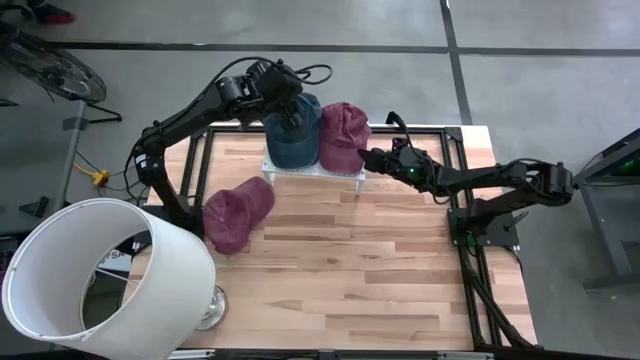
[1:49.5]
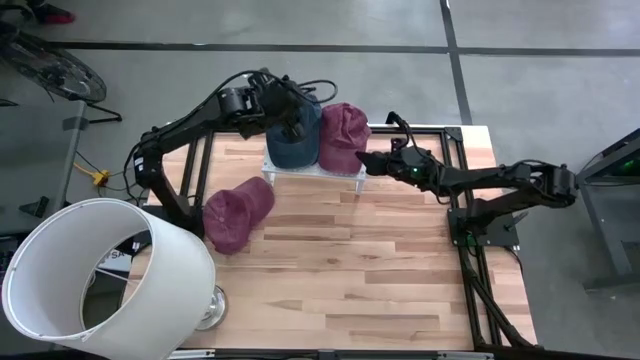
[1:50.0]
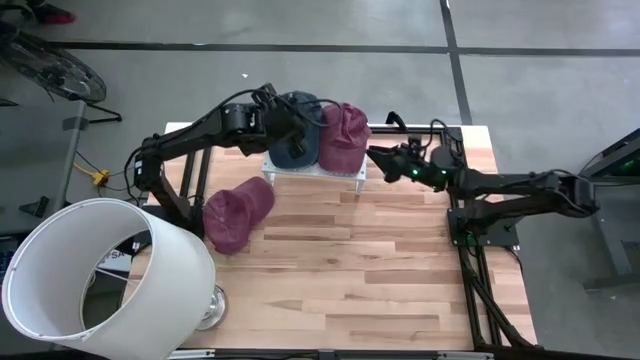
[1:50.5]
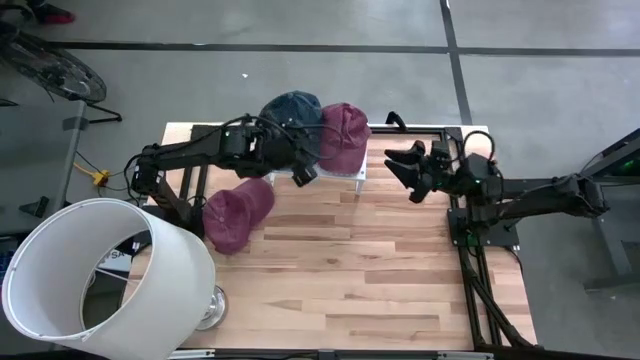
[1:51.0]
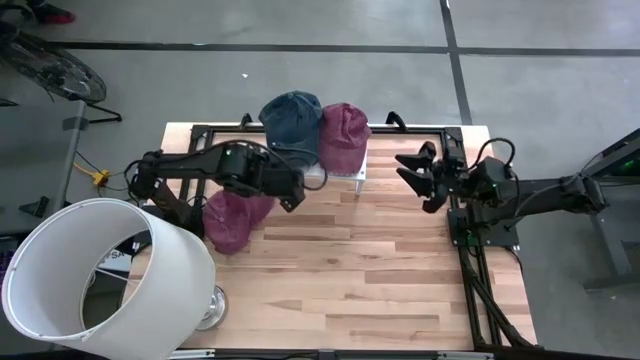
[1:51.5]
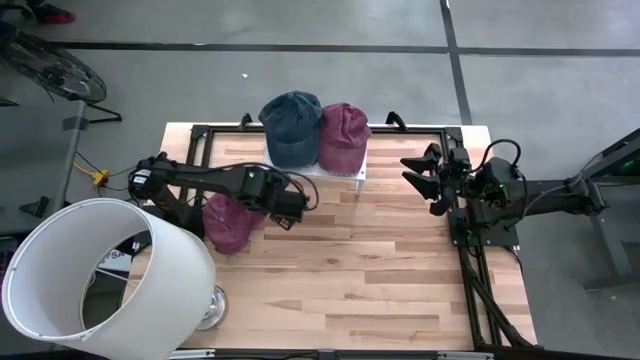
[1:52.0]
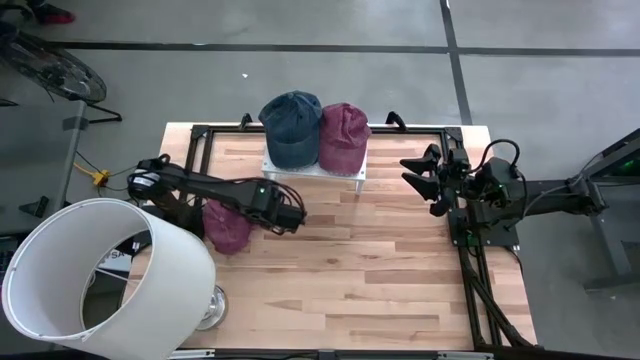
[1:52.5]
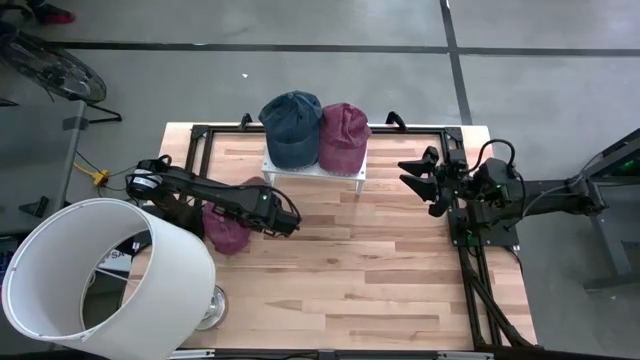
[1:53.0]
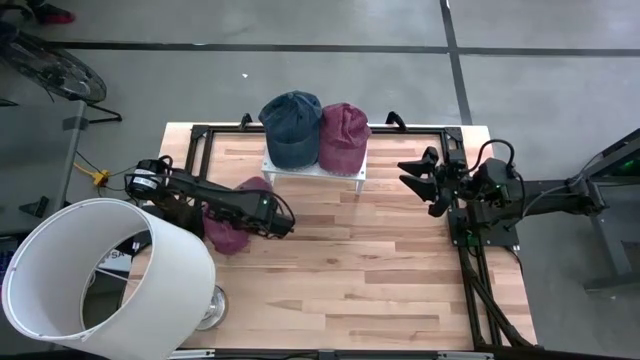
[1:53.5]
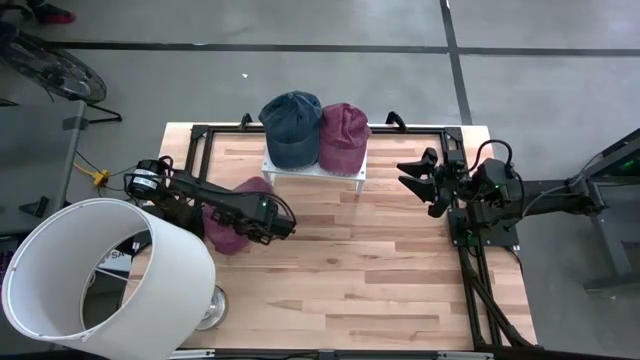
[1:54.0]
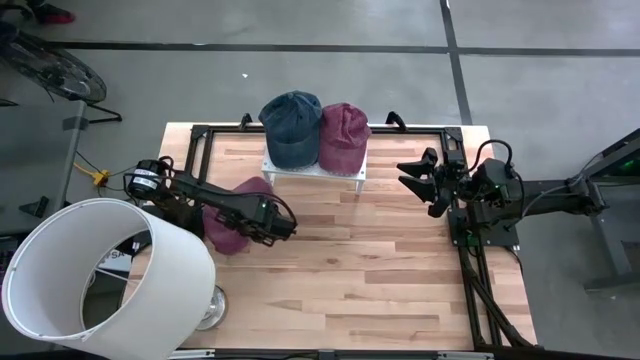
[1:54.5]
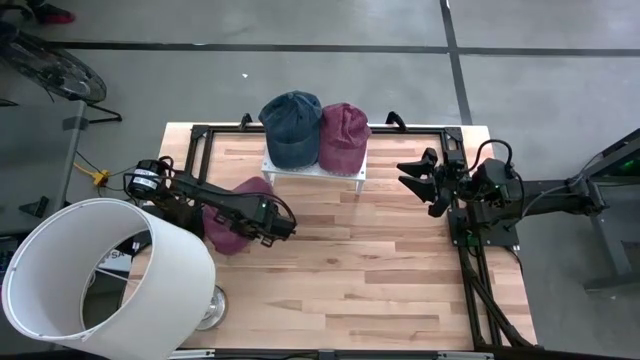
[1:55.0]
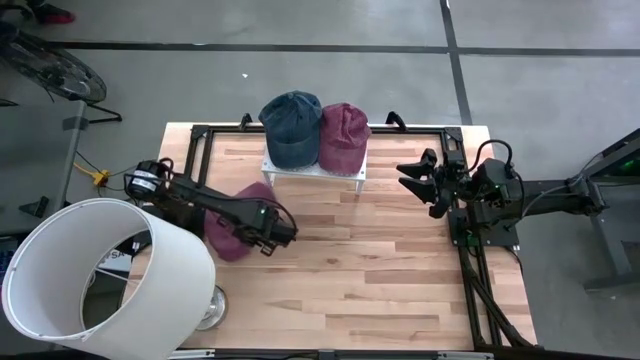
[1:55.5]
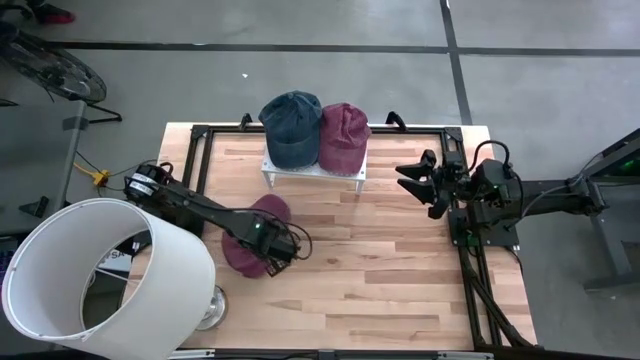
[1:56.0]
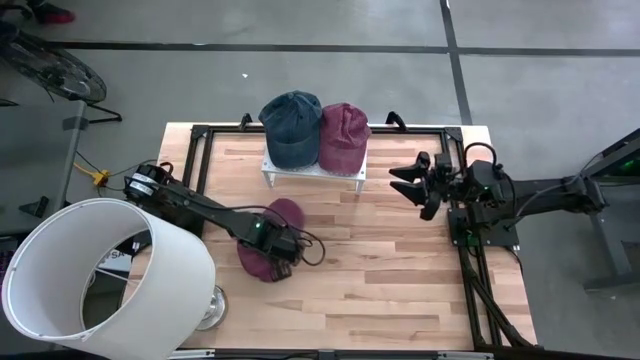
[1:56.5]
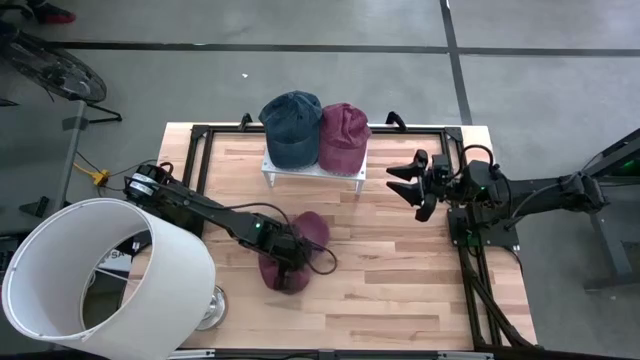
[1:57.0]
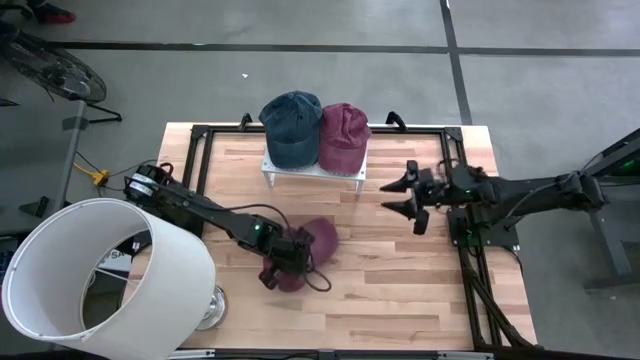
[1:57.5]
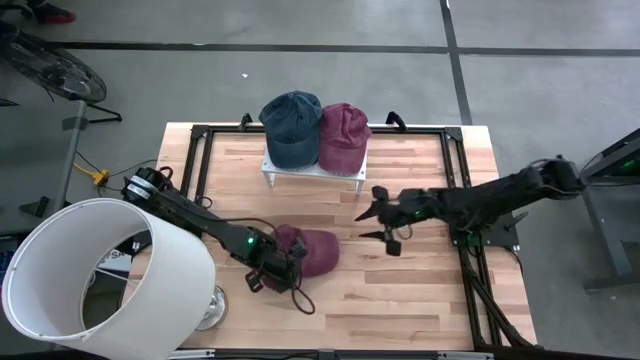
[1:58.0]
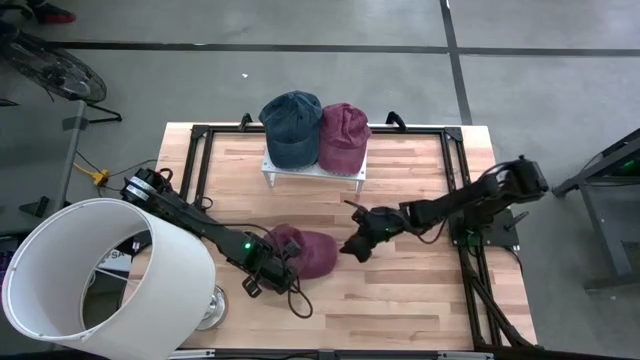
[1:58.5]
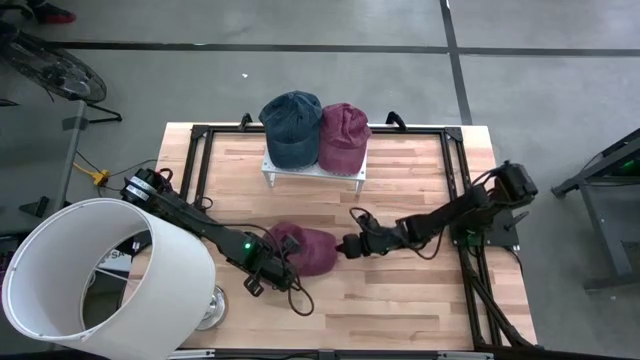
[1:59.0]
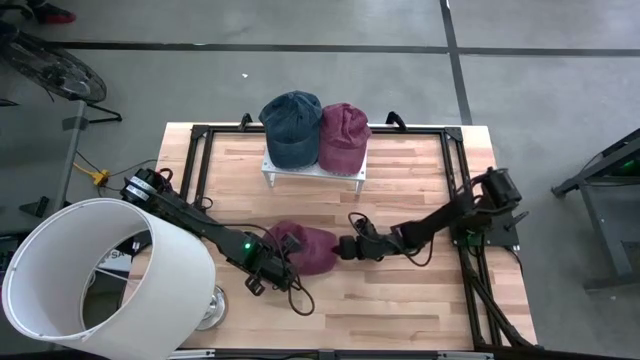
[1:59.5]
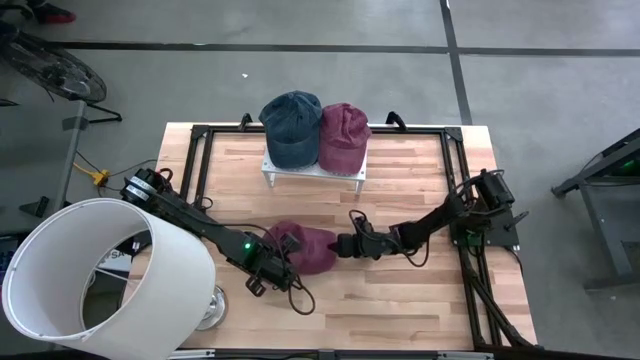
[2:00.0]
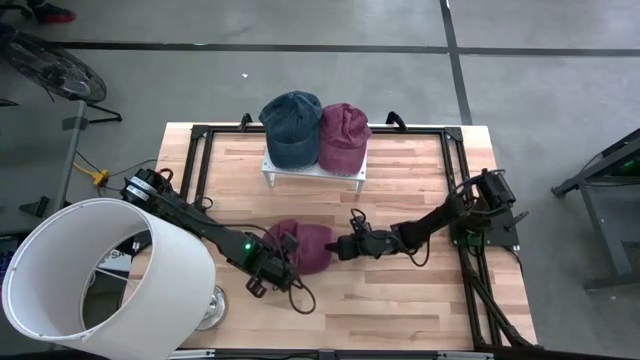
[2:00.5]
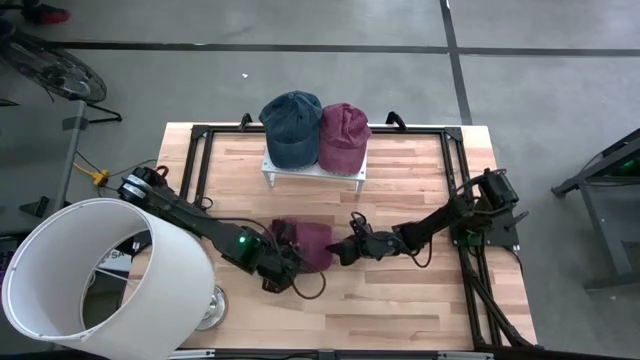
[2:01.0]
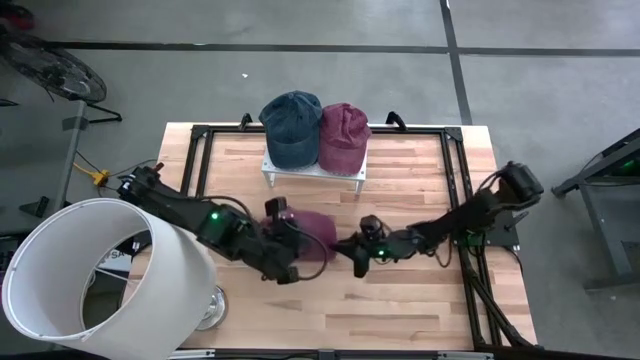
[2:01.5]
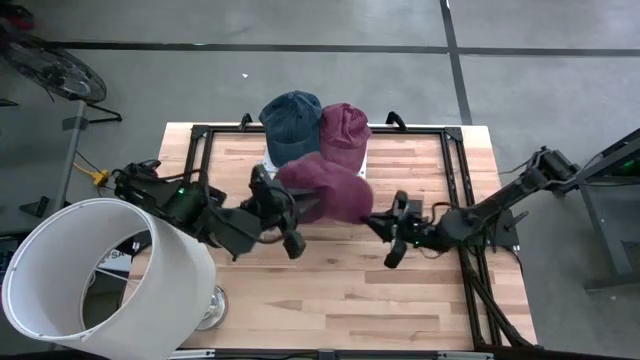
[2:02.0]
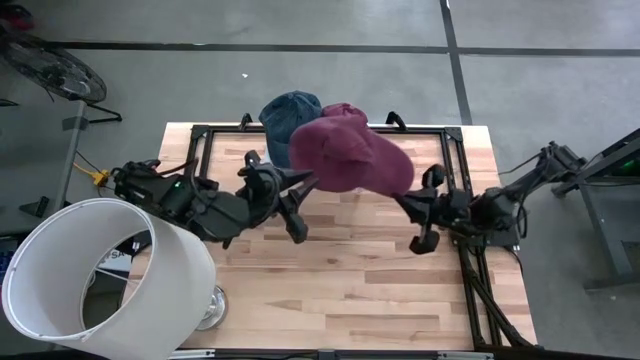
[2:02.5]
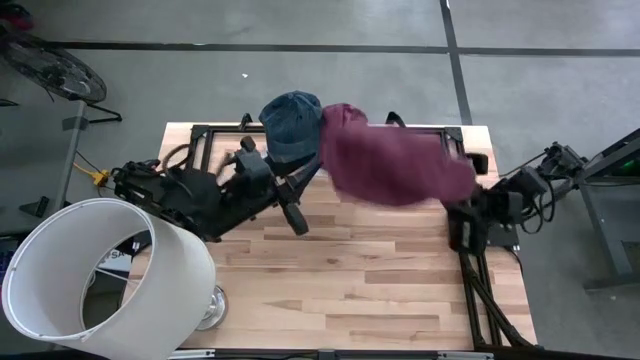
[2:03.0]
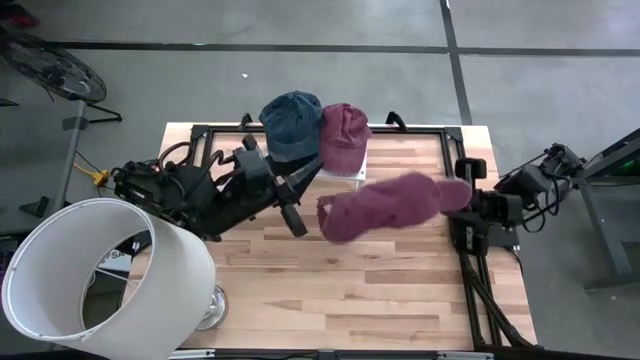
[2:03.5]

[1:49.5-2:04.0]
Task: Pick & Place hat
Stack the dark red on top of the dark red cap on the shelf
